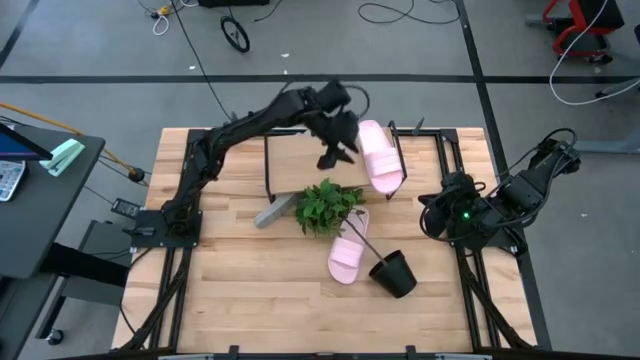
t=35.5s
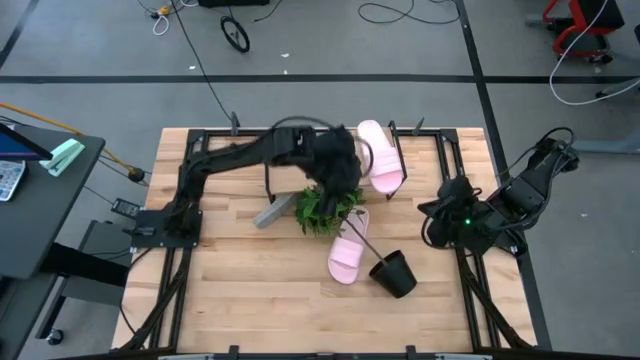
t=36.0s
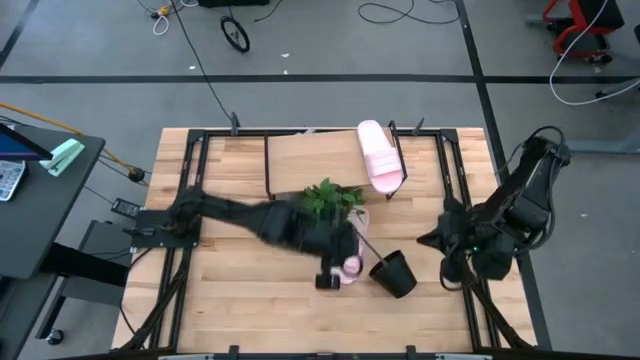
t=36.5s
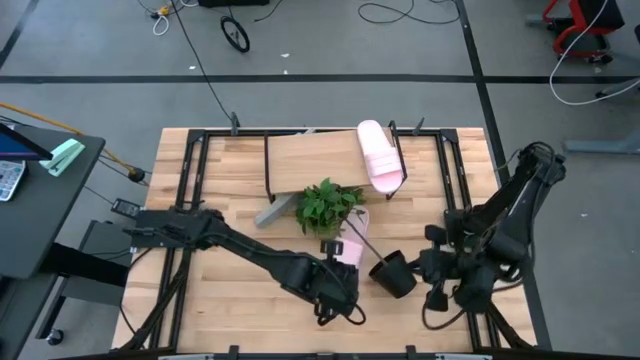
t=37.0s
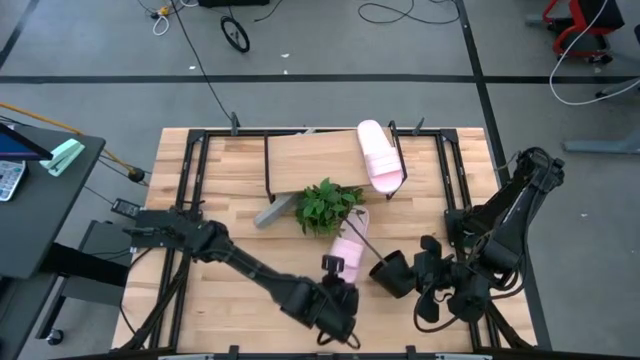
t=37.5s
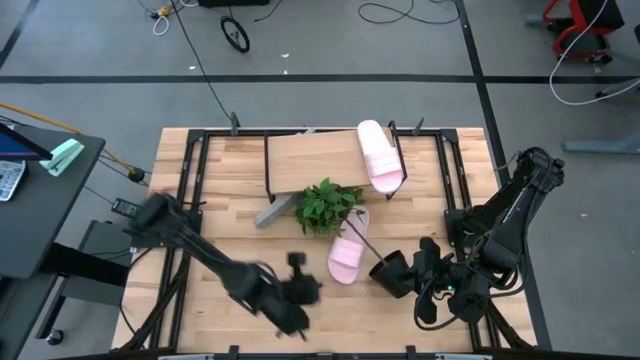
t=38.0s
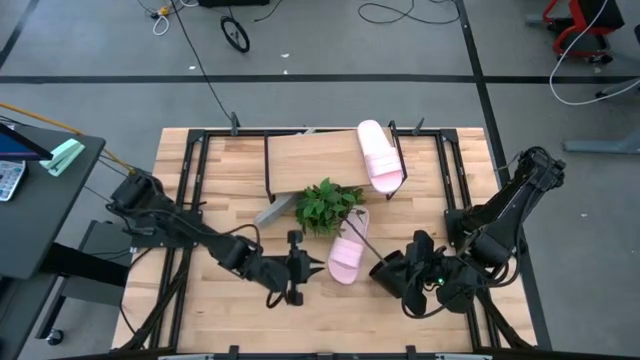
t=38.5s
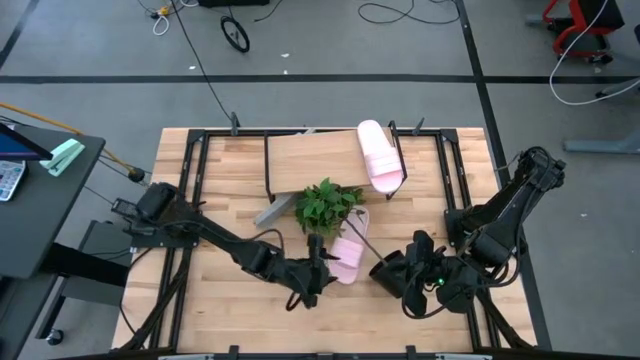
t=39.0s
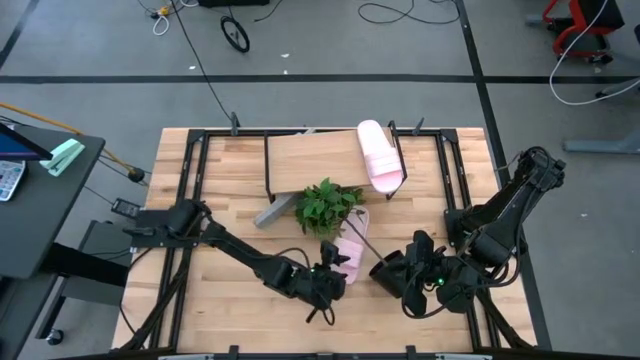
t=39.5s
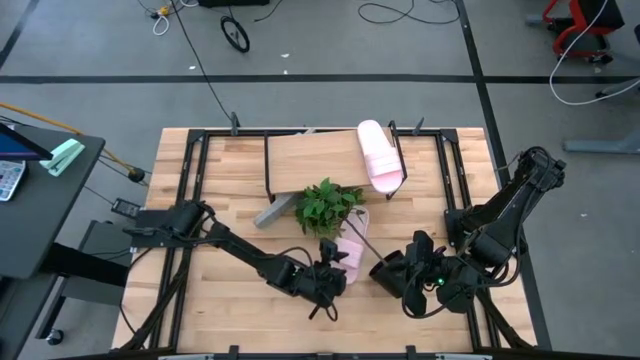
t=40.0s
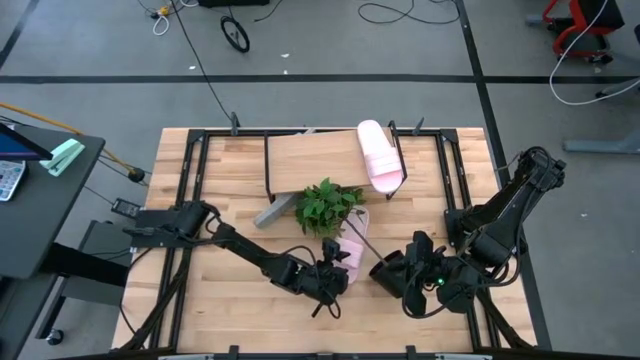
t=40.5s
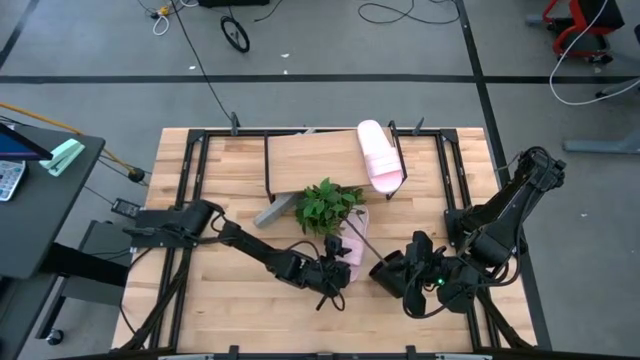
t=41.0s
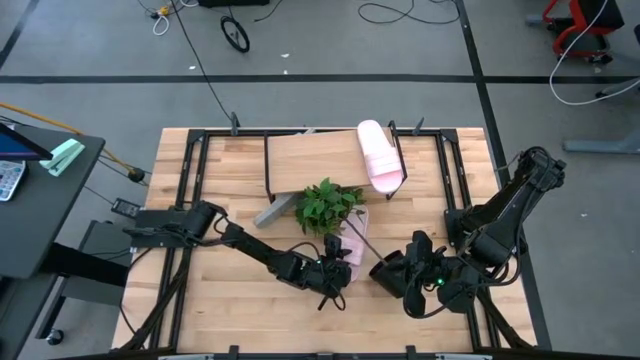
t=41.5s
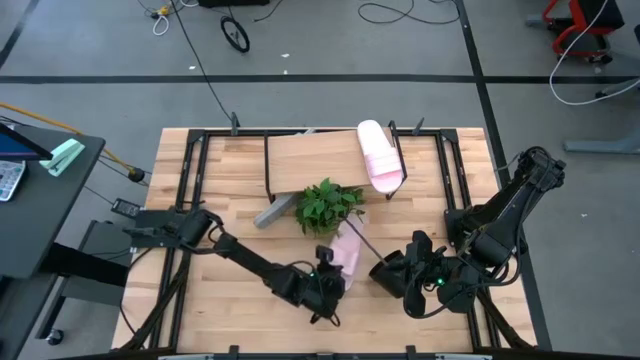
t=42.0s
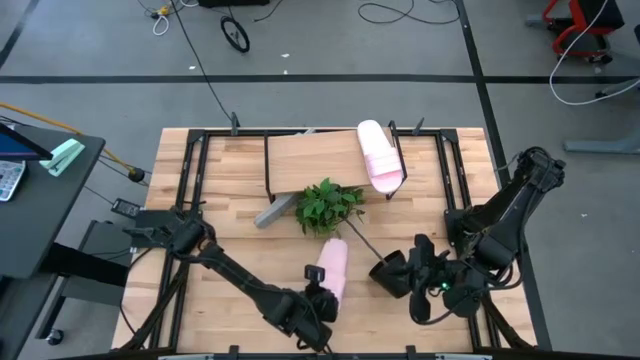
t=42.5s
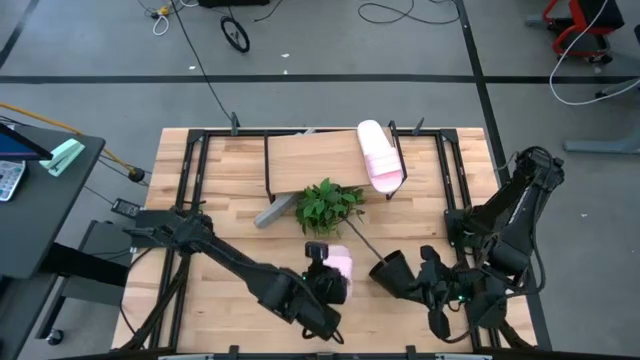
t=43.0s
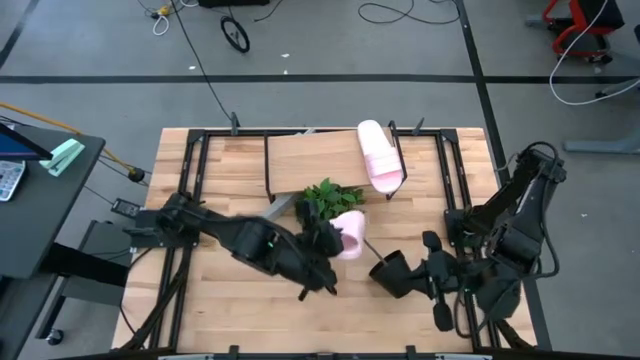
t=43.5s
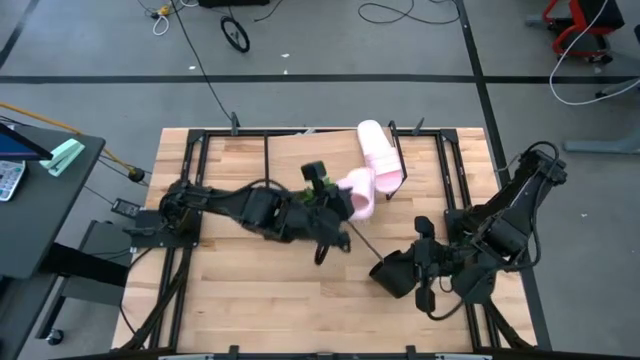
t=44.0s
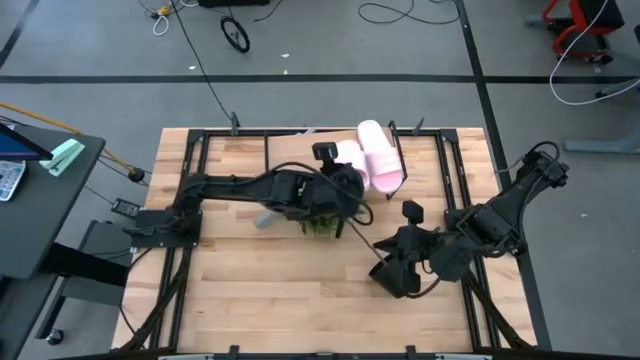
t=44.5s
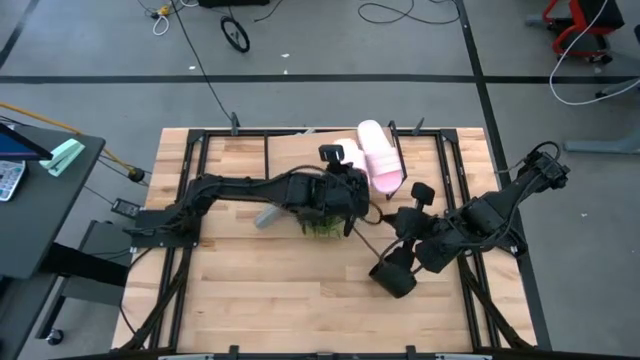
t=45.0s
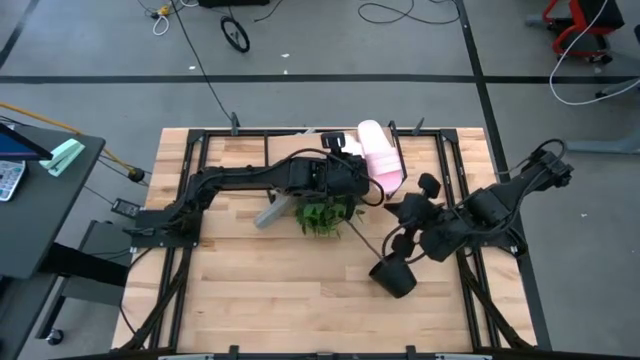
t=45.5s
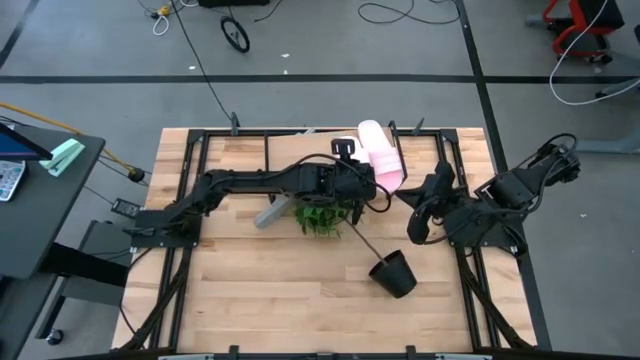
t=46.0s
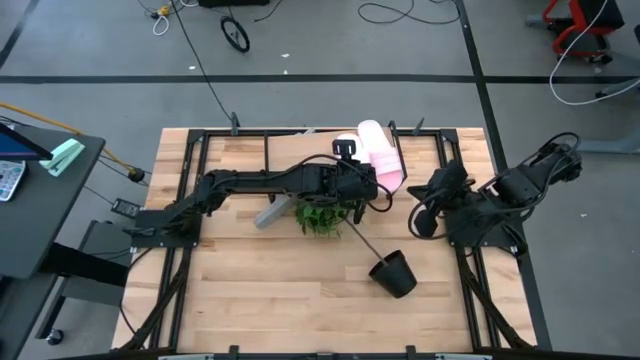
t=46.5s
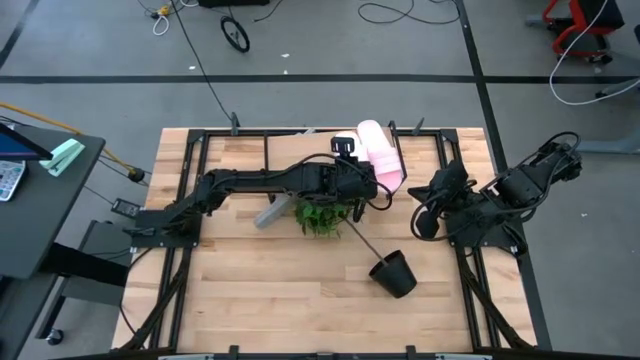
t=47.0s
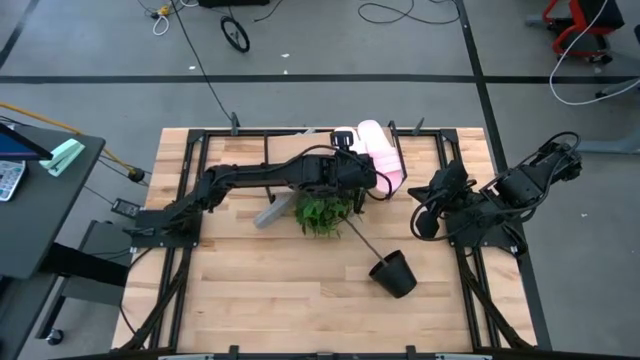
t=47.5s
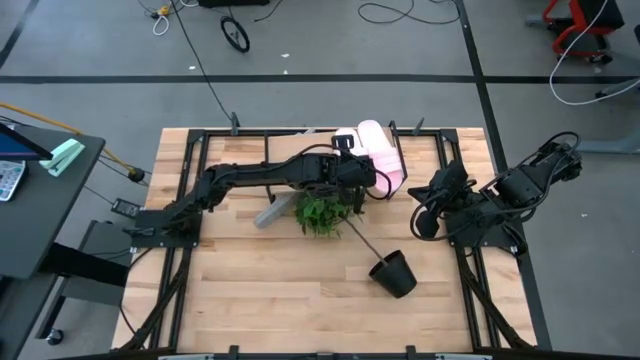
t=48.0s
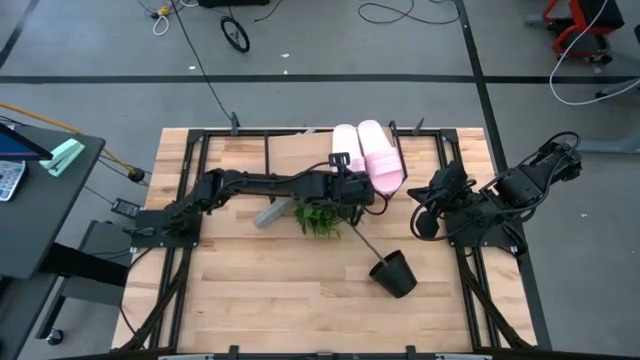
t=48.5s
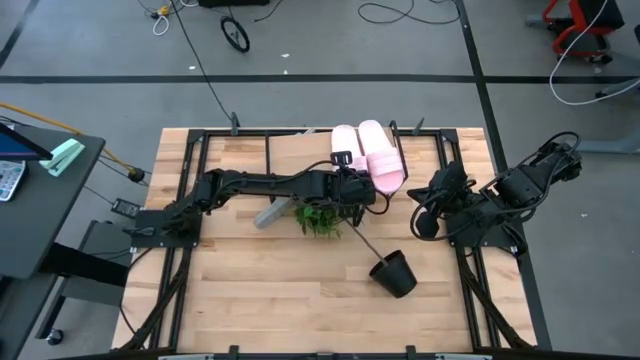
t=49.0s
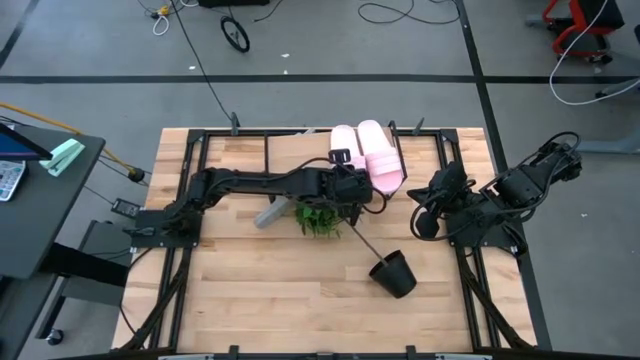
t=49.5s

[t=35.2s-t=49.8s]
Task: Pick and place slides into the shelf
Put the pink slides on the shelf

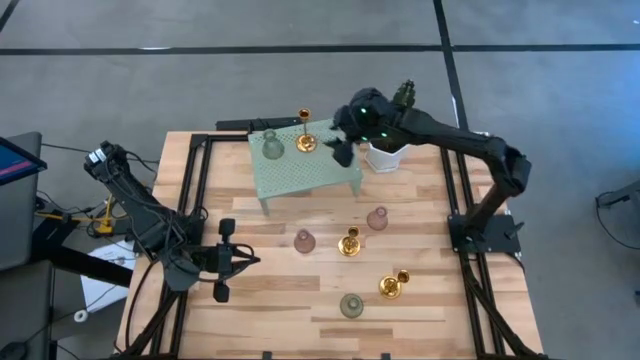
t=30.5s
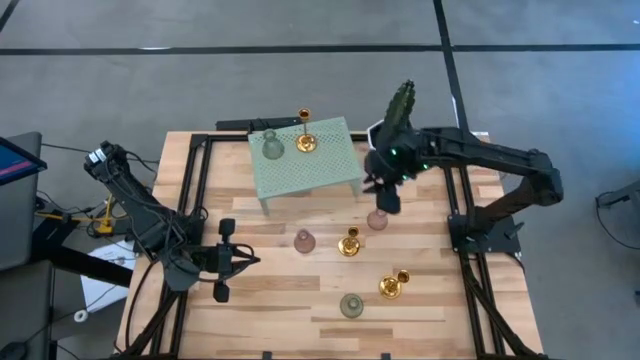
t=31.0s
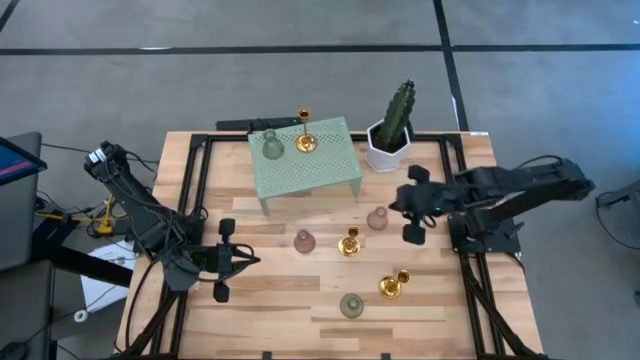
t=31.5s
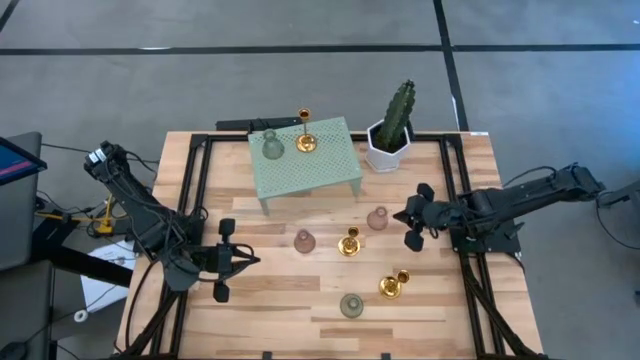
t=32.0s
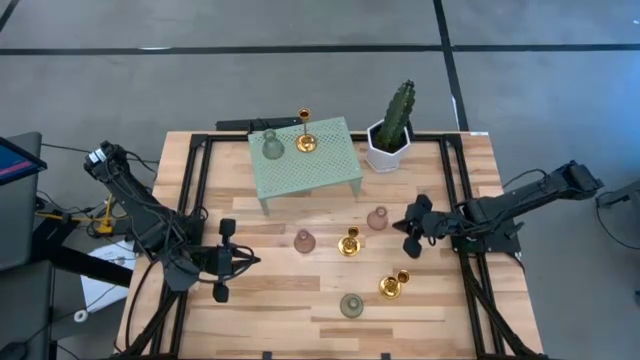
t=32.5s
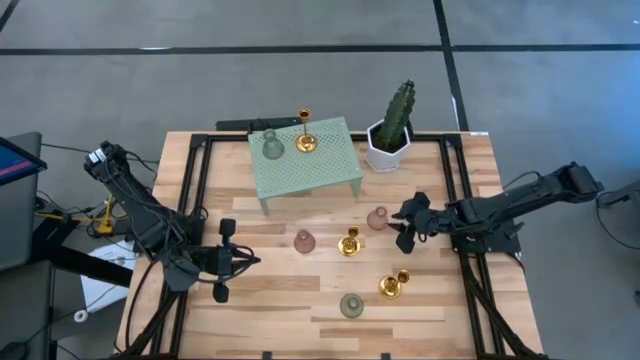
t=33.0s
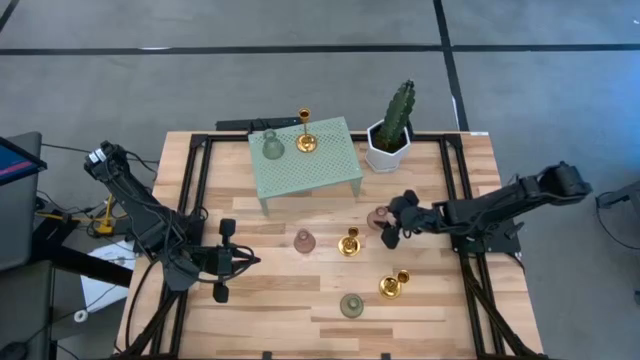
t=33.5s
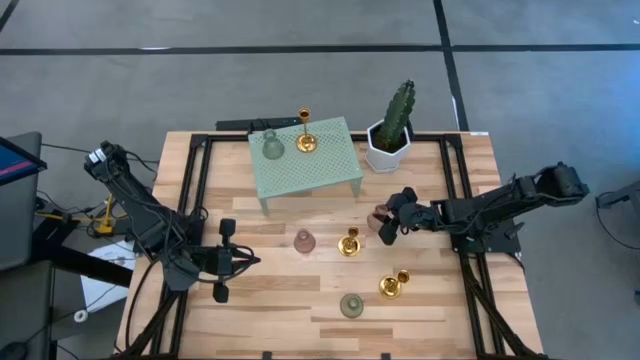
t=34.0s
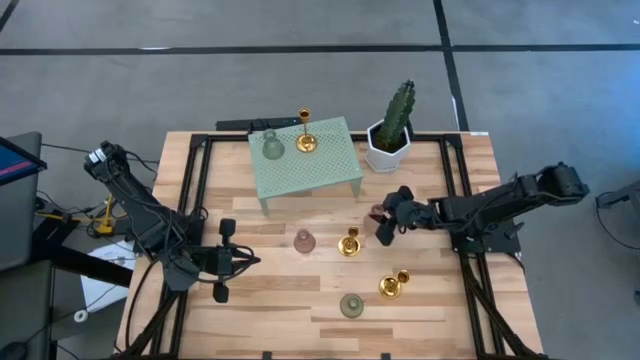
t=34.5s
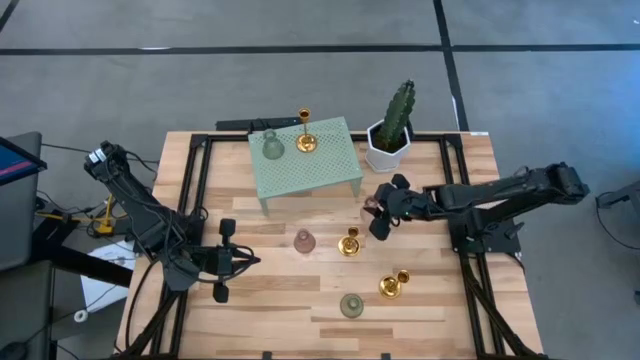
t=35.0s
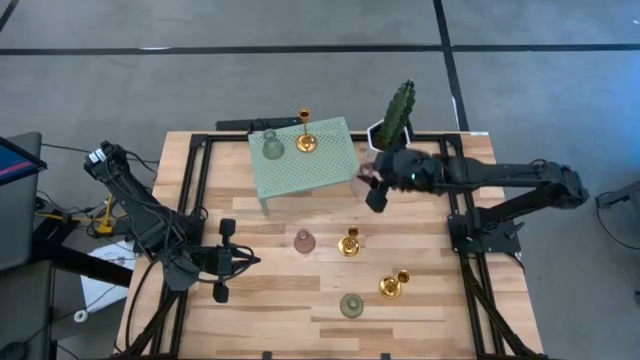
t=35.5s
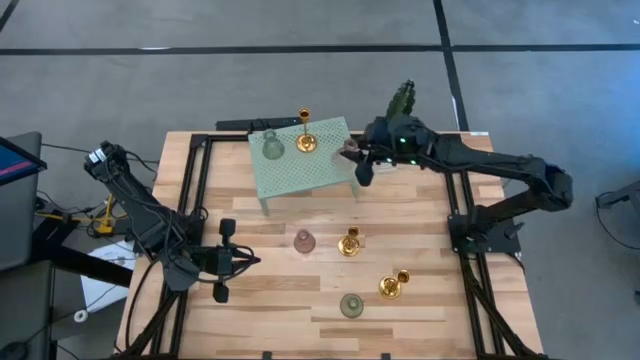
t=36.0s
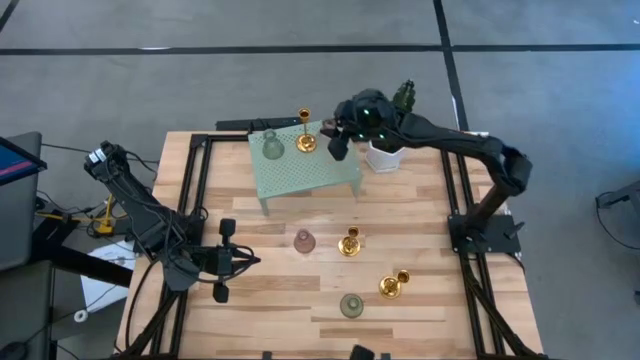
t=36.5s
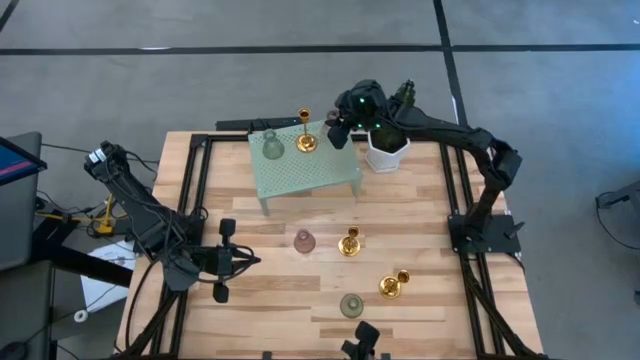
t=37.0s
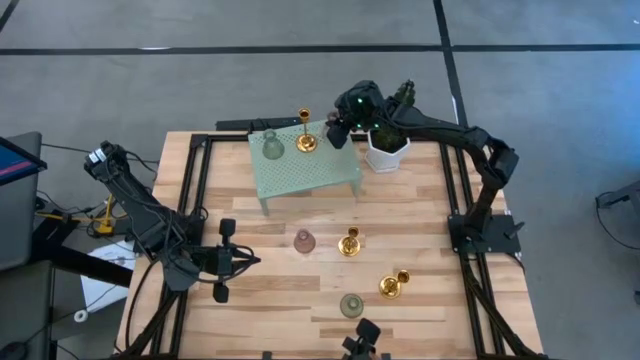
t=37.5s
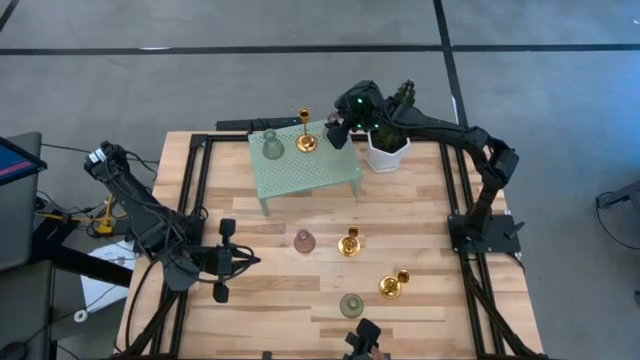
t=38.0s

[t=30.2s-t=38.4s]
Task: Pick & Place candle stick holders
Put the right pink glass candle holder on the shelf
